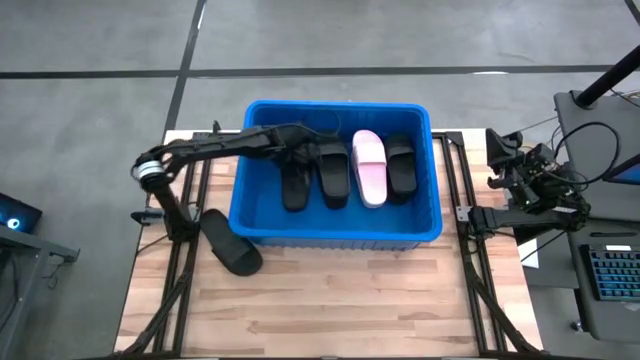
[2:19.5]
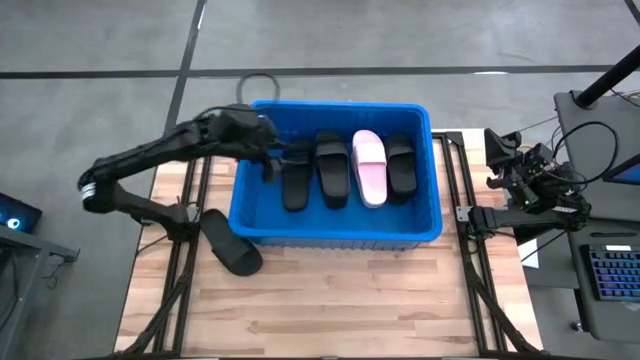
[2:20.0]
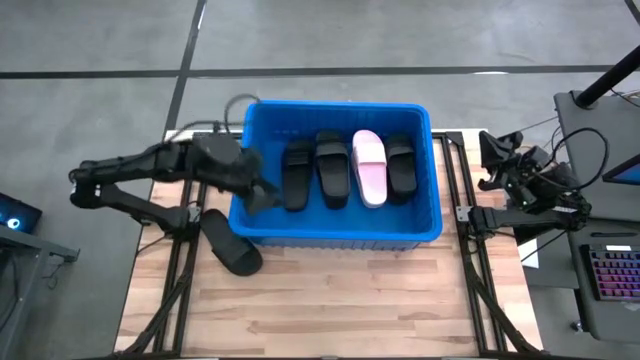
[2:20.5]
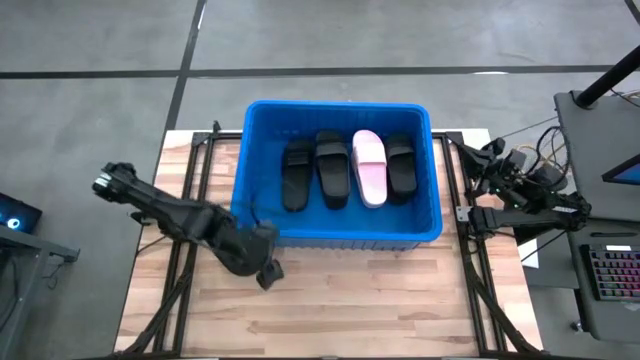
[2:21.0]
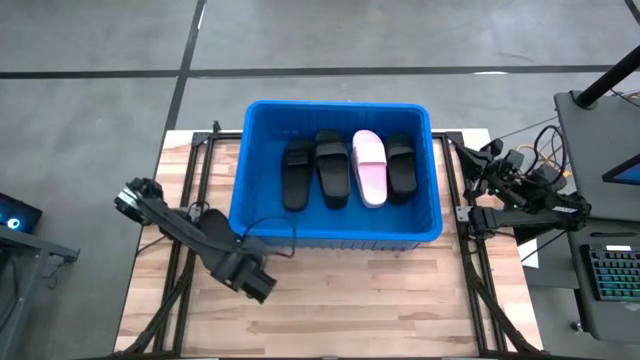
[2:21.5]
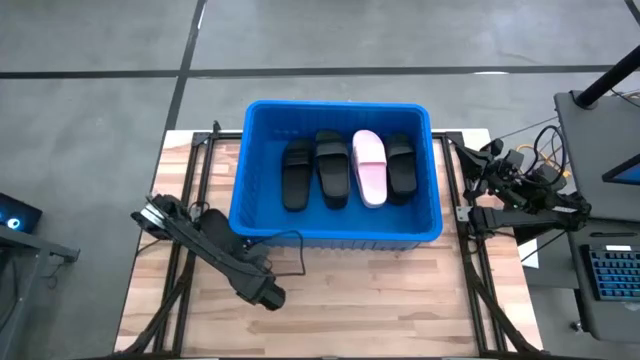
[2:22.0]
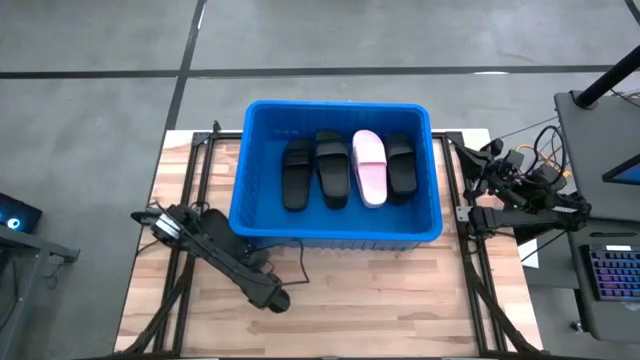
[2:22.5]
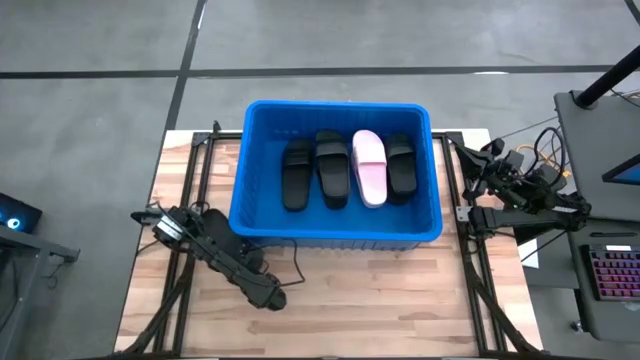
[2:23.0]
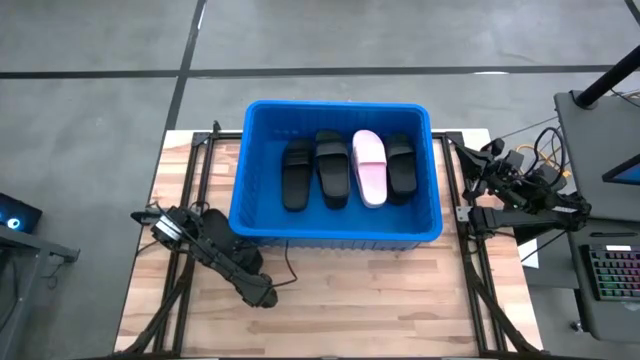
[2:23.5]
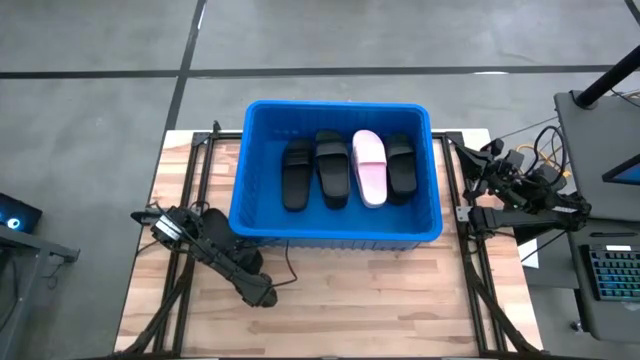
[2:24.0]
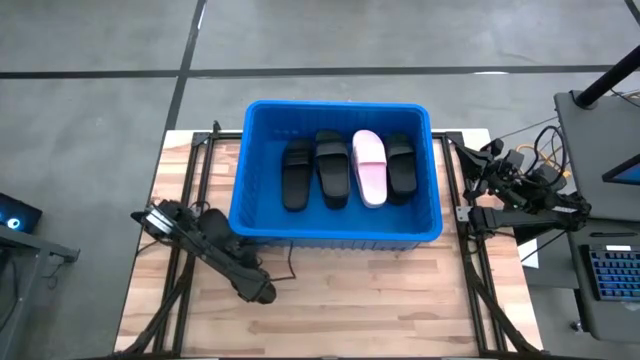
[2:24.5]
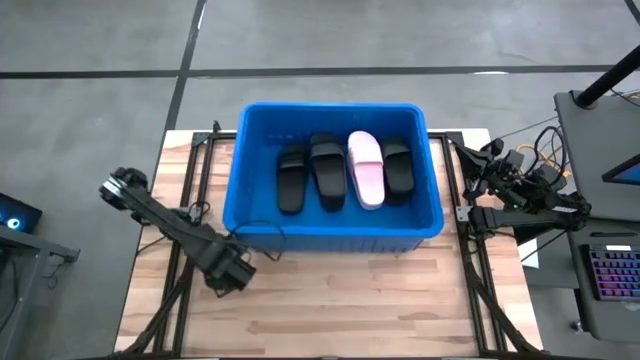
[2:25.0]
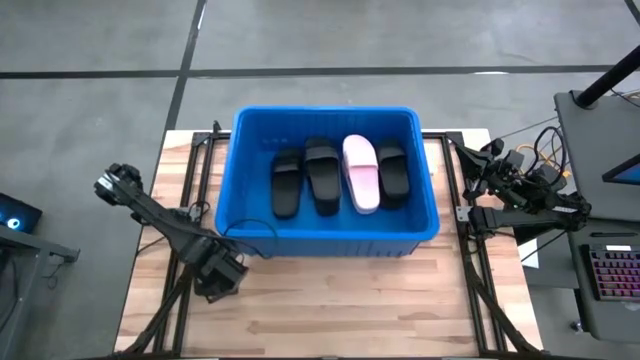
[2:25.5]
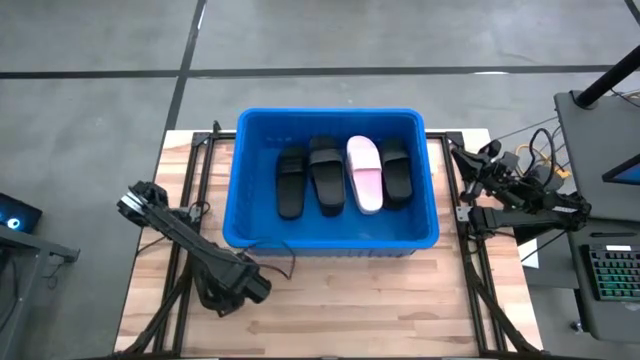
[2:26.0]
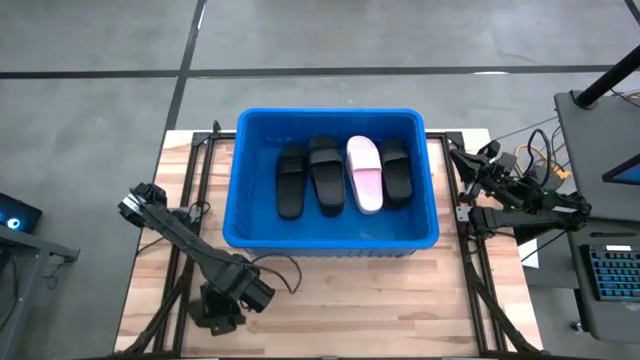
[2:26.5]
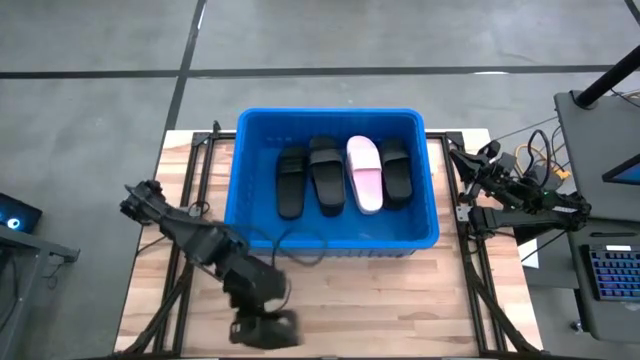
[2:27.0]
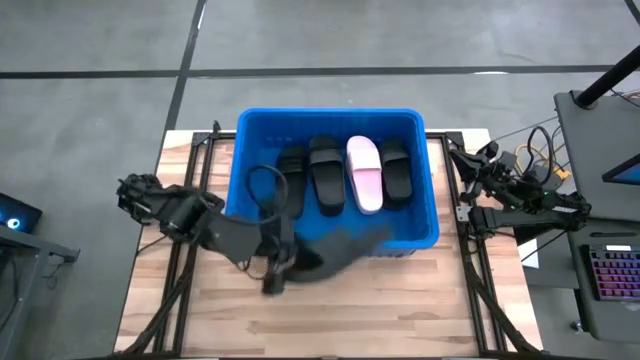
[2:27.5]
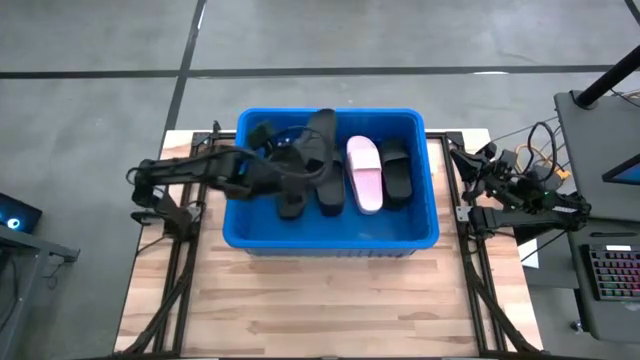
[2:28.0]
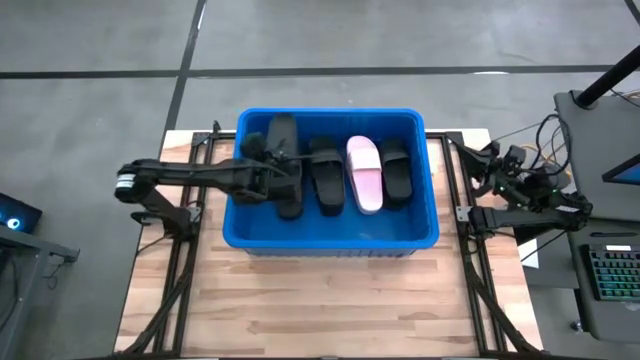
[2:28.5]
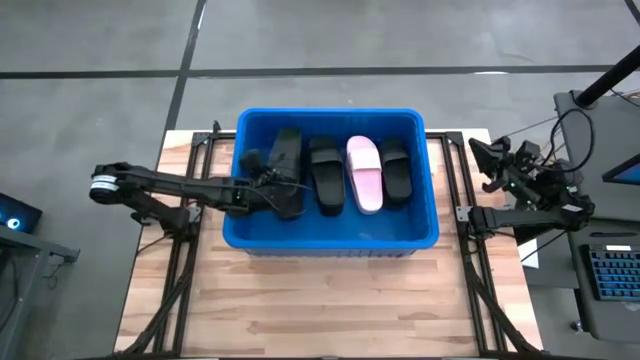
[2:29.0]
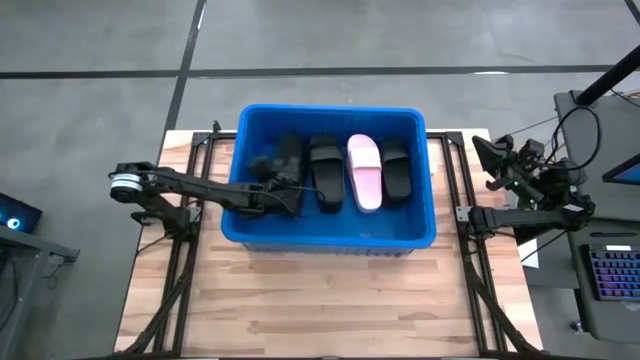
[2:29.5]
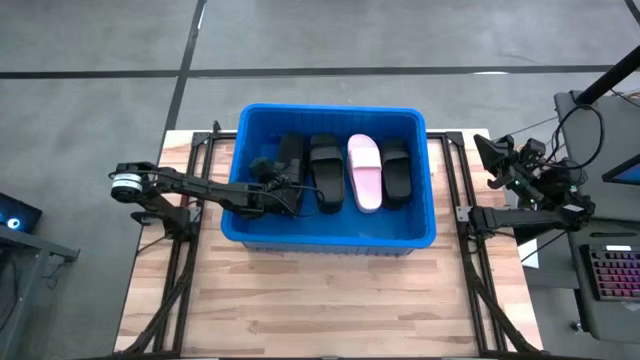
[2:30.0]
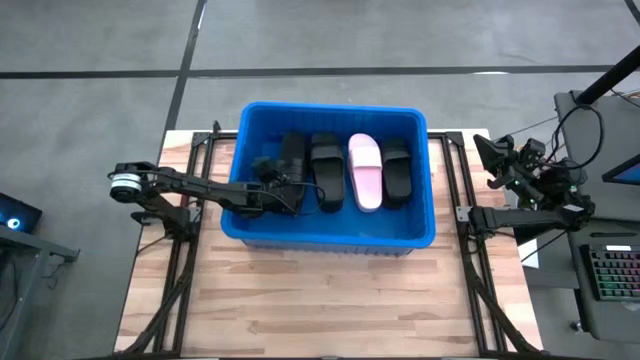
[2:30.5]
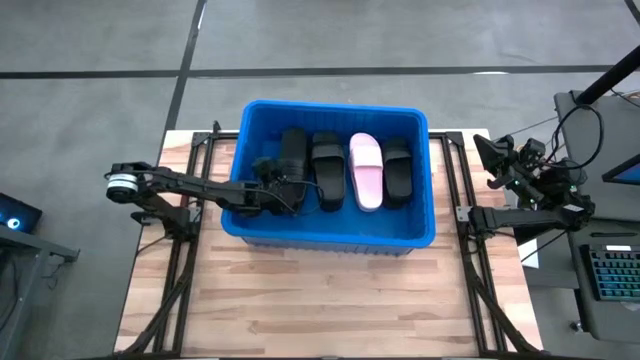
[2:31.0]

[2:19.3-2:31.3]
Task: Pick and place slides into bin
Put the black slide into the blue container

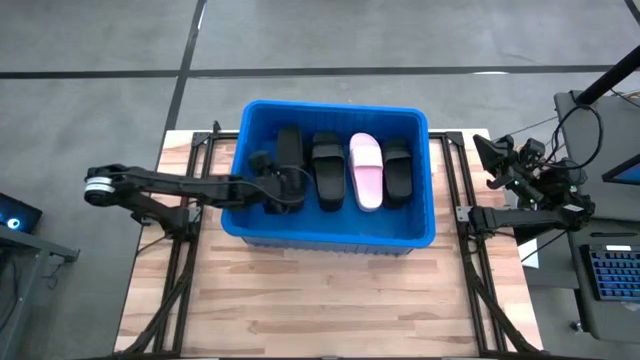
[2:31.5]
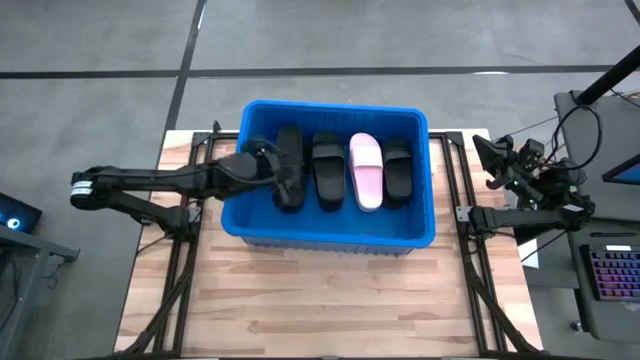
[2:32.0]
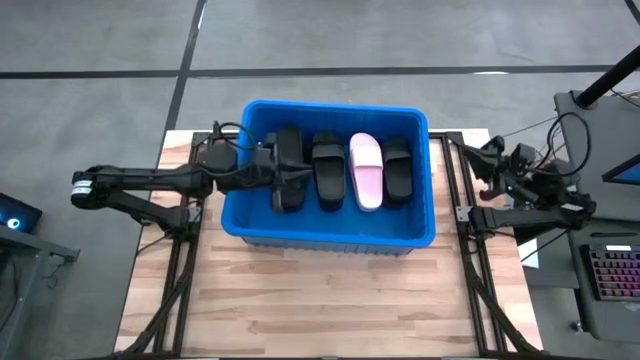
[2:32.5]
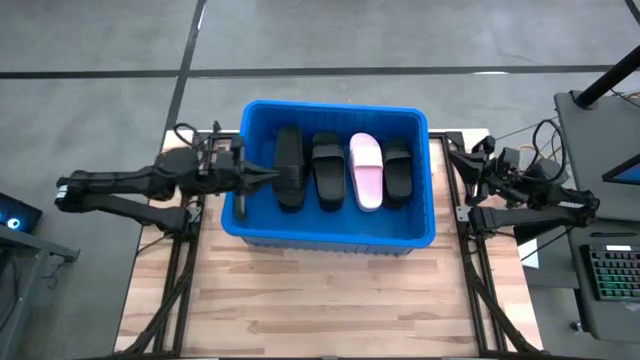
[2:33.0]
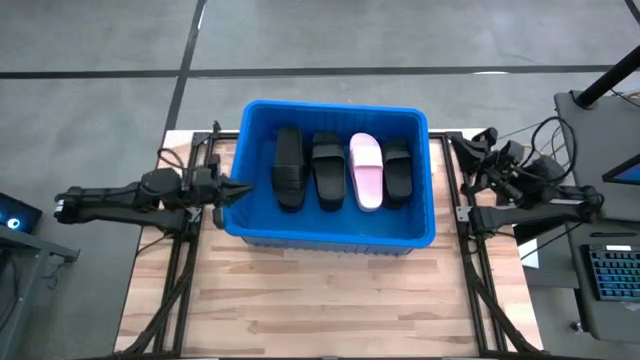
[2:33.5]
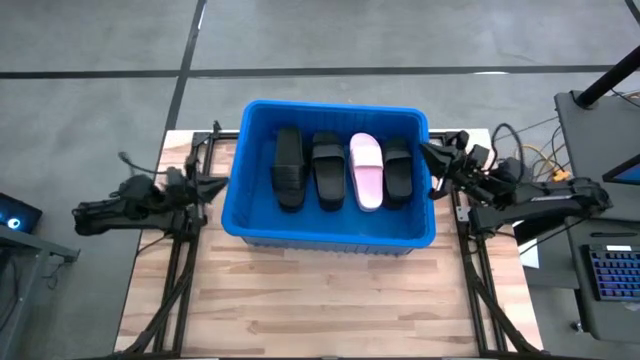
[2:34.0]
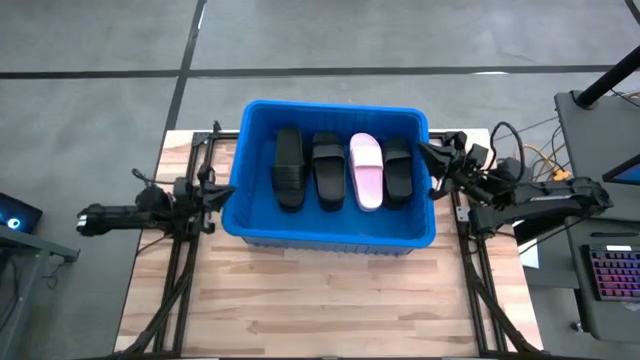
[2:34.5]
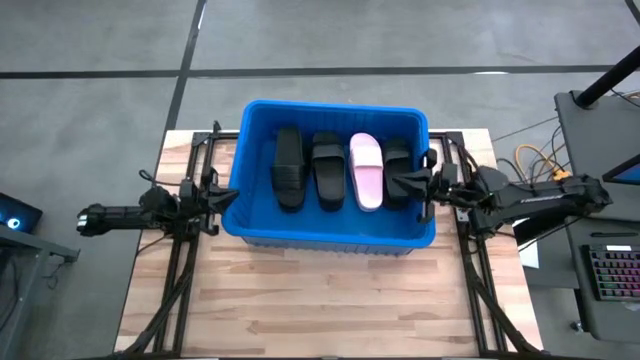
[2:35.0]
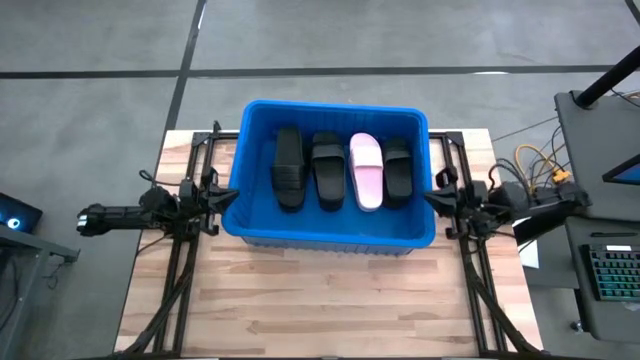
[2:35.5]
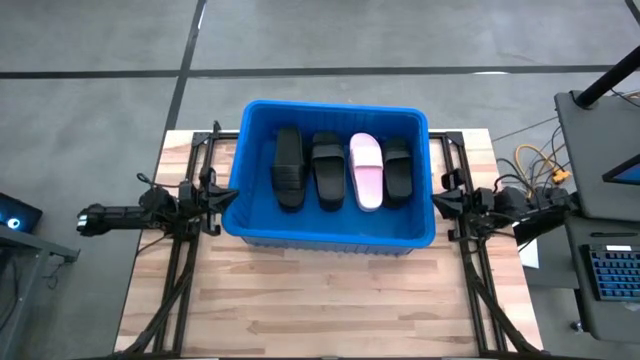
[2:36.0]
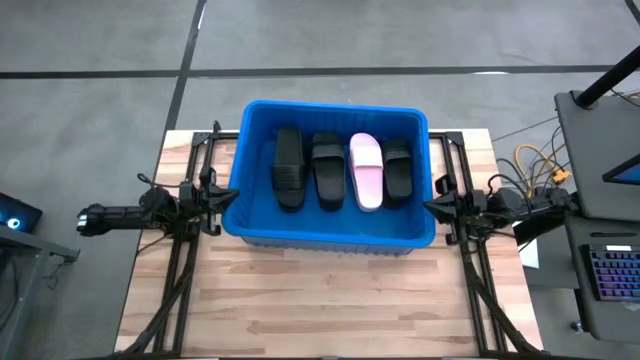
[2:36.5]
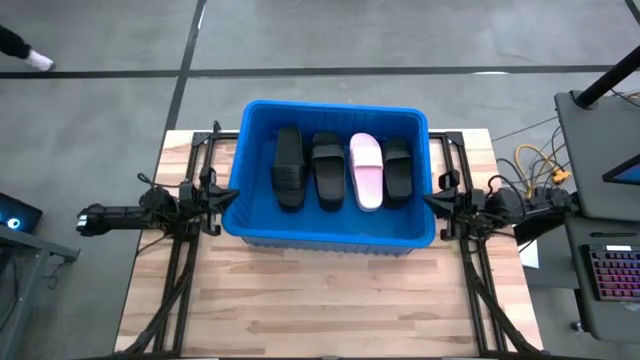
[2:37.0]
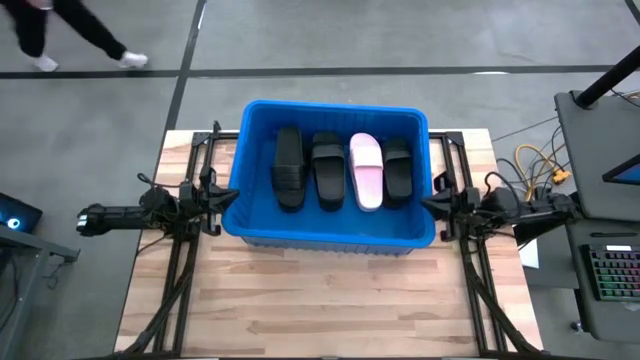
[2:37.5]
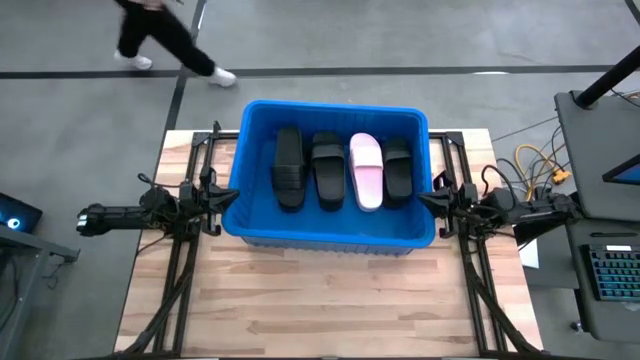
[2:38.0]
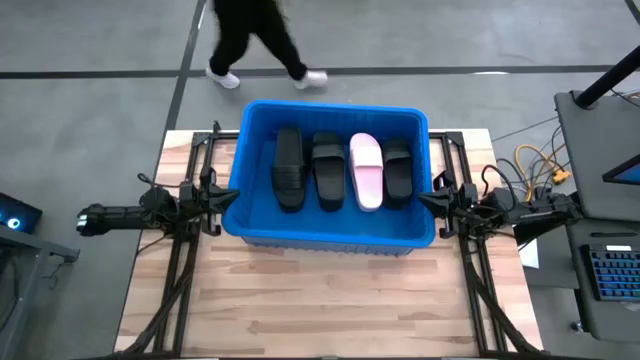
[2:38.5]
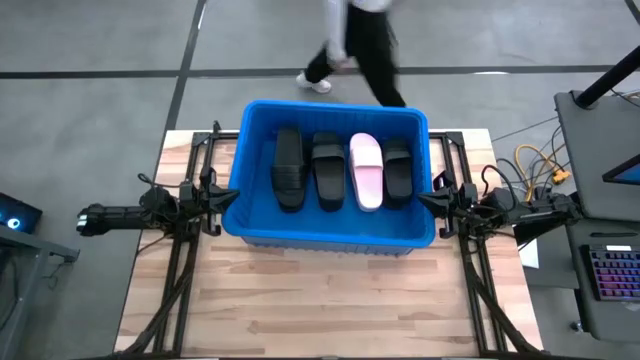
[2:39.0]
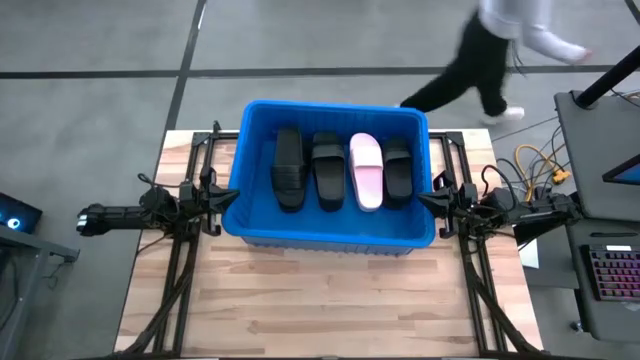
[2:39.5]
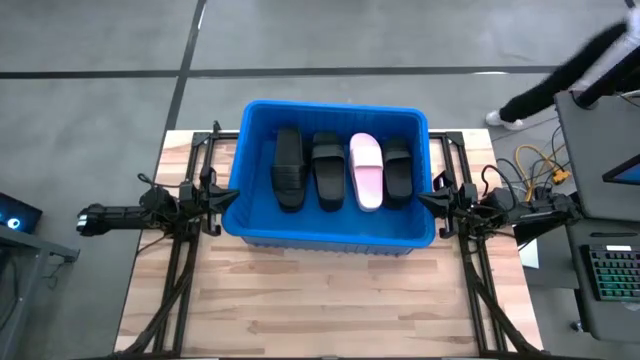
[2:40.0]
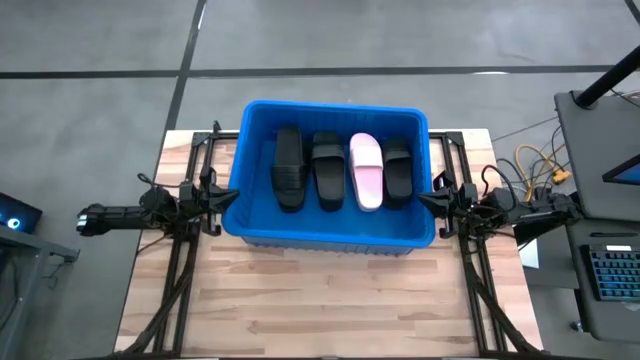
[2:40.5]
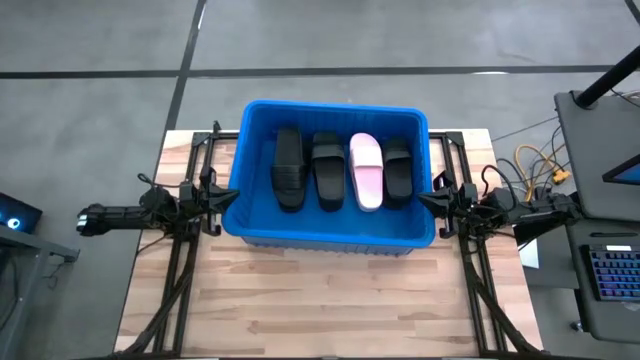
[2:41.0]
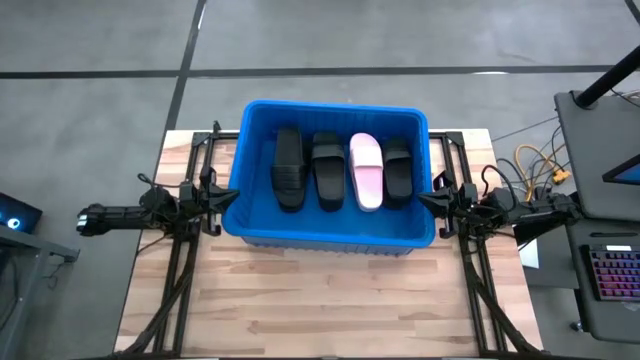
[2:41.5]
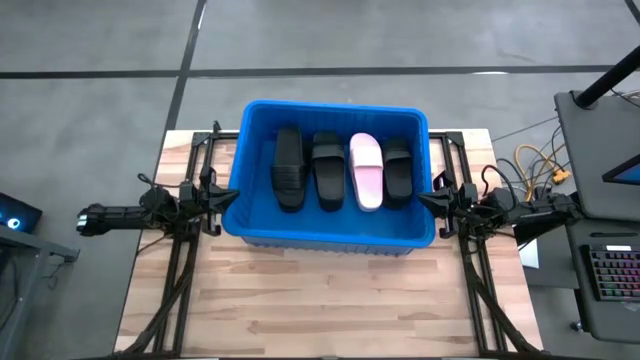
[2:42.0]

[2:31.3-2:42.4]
Return to Home Position
